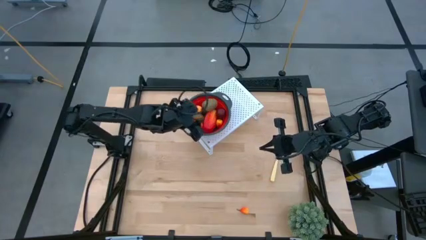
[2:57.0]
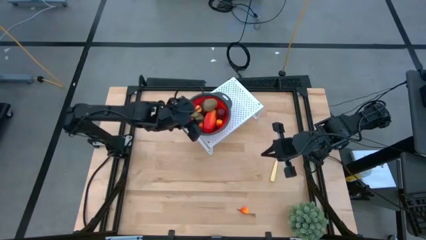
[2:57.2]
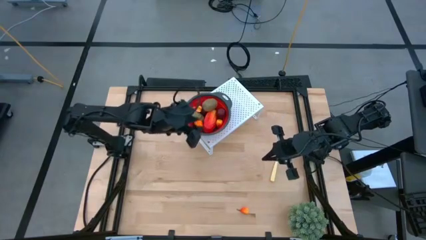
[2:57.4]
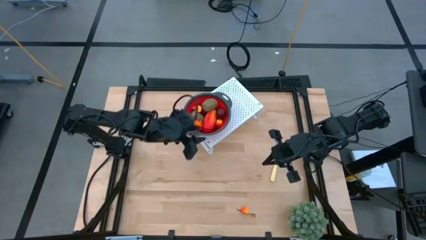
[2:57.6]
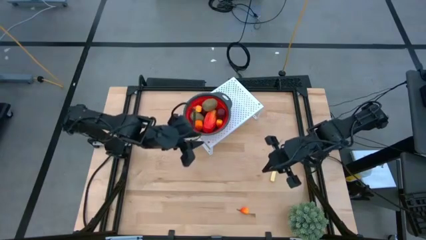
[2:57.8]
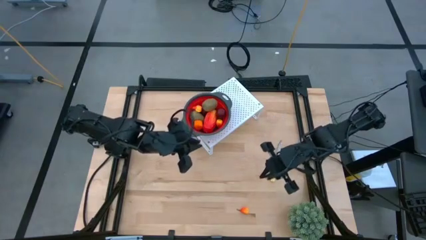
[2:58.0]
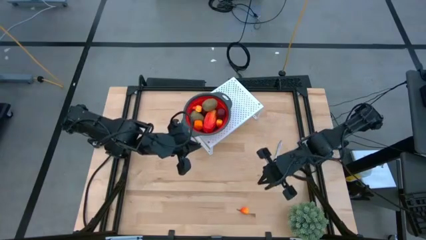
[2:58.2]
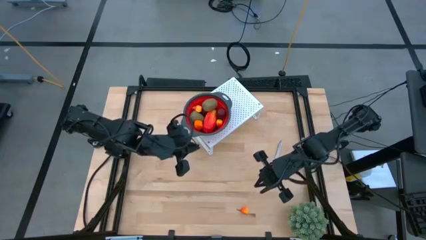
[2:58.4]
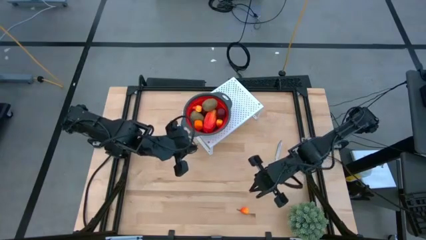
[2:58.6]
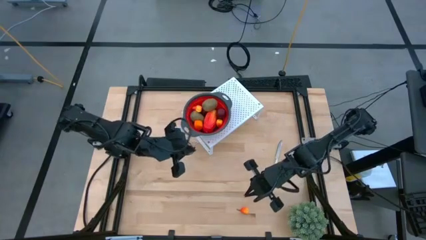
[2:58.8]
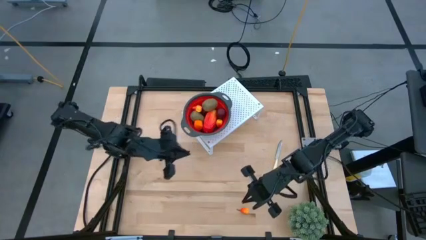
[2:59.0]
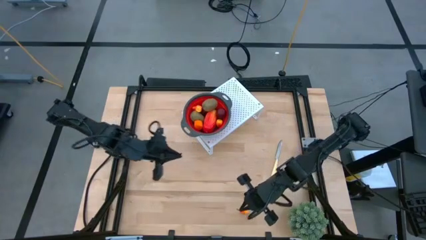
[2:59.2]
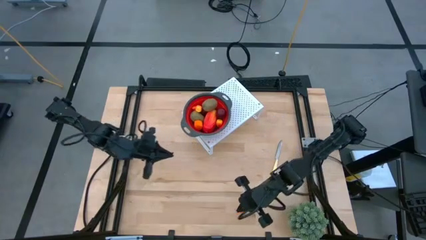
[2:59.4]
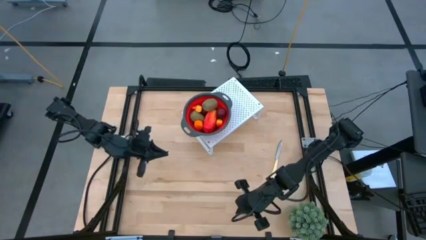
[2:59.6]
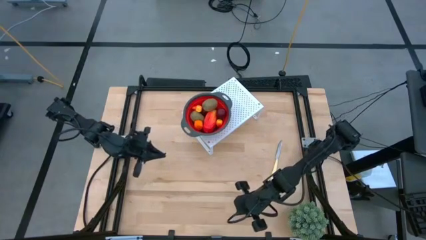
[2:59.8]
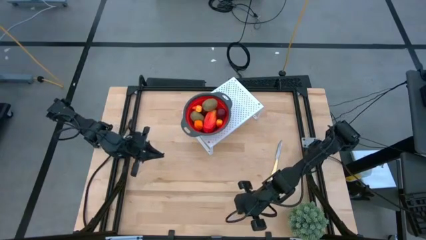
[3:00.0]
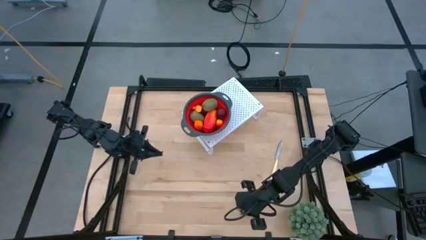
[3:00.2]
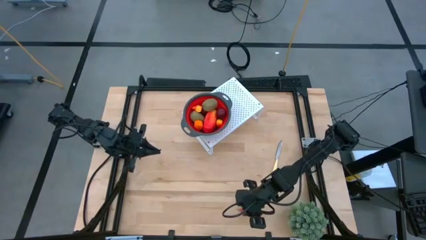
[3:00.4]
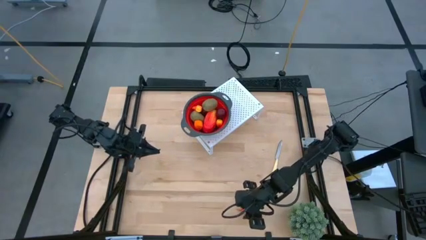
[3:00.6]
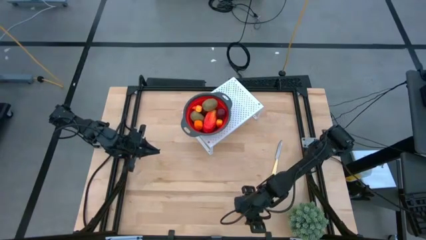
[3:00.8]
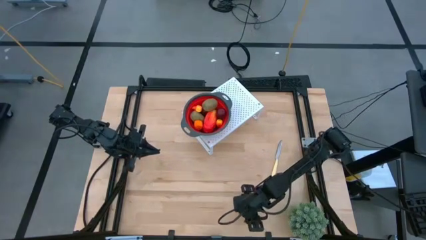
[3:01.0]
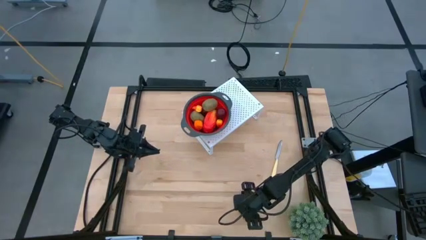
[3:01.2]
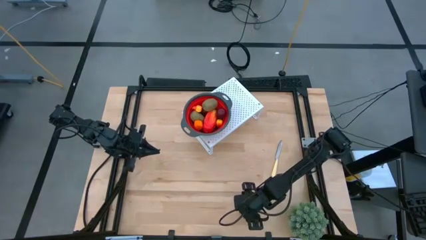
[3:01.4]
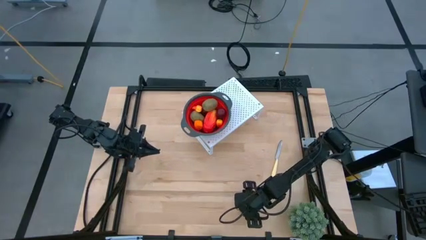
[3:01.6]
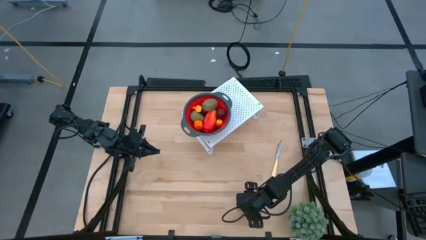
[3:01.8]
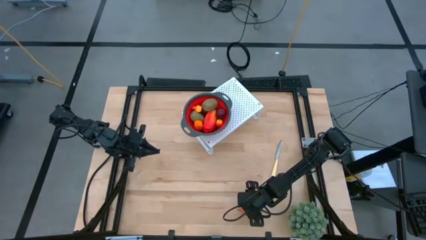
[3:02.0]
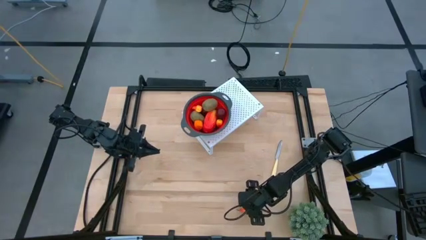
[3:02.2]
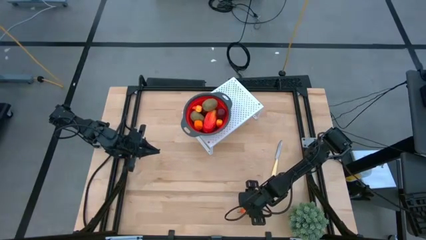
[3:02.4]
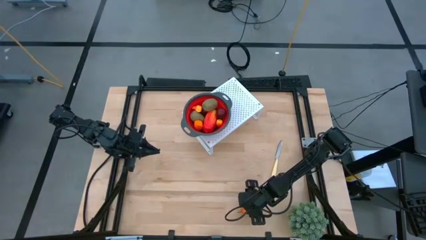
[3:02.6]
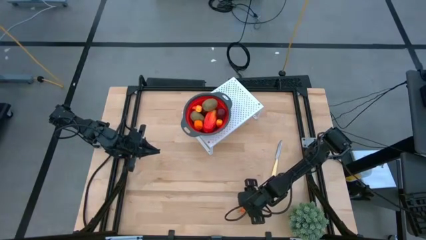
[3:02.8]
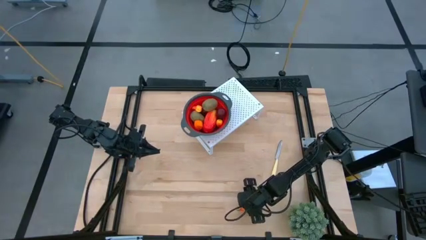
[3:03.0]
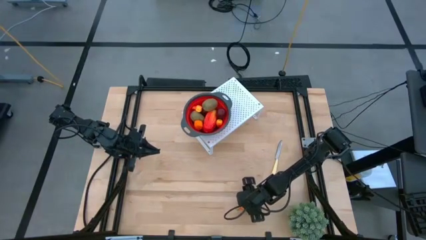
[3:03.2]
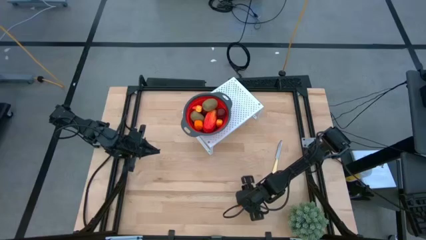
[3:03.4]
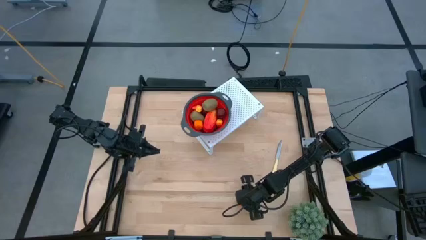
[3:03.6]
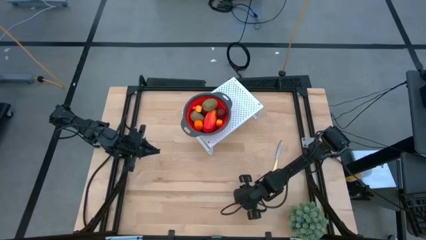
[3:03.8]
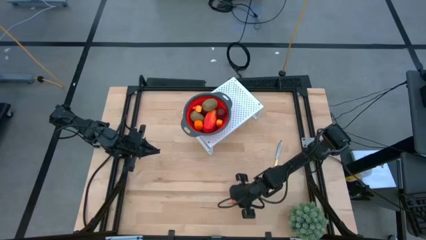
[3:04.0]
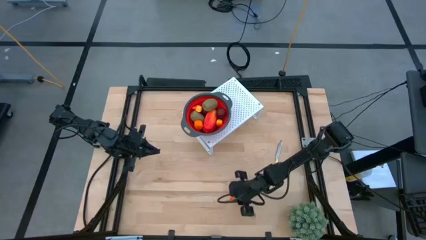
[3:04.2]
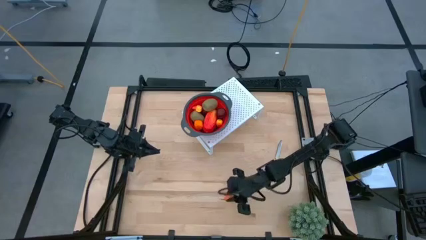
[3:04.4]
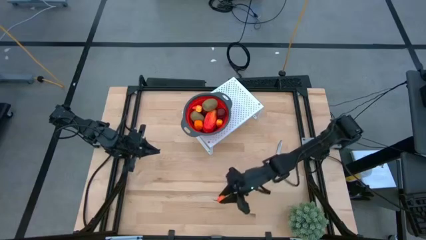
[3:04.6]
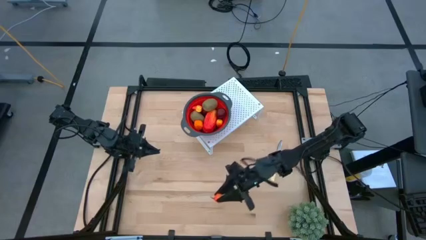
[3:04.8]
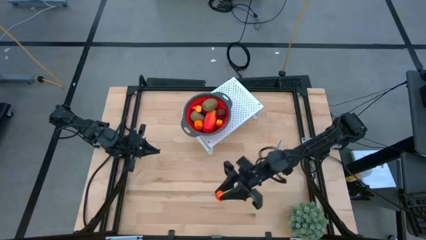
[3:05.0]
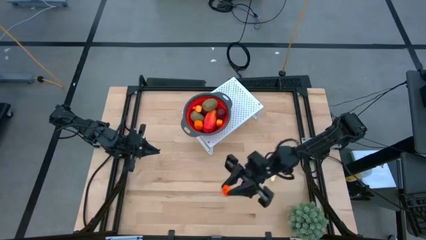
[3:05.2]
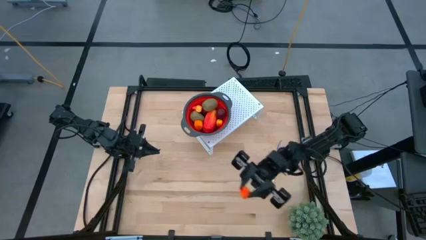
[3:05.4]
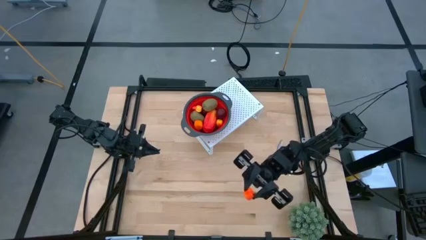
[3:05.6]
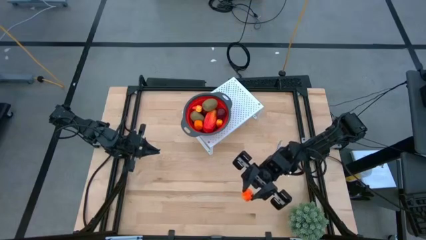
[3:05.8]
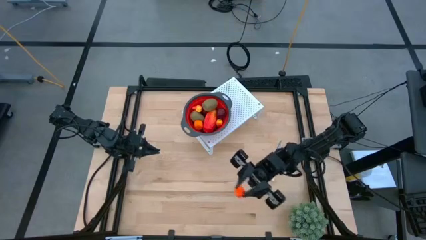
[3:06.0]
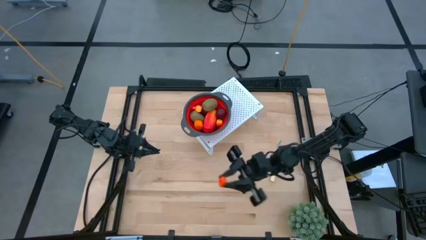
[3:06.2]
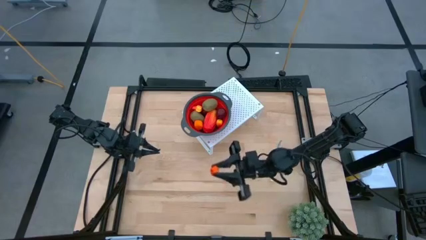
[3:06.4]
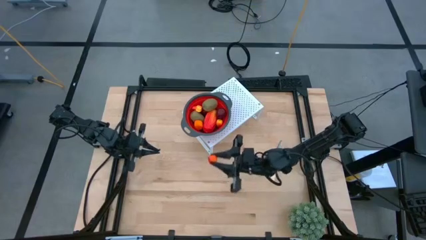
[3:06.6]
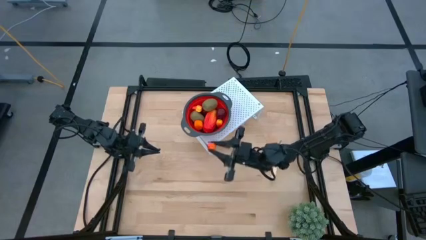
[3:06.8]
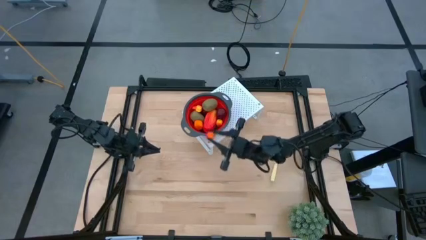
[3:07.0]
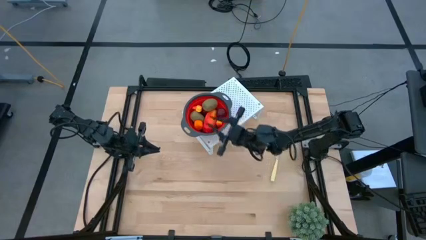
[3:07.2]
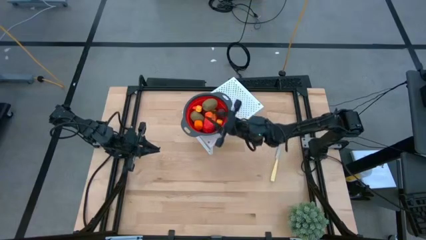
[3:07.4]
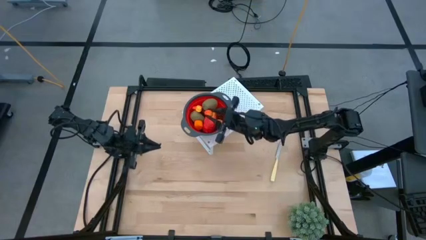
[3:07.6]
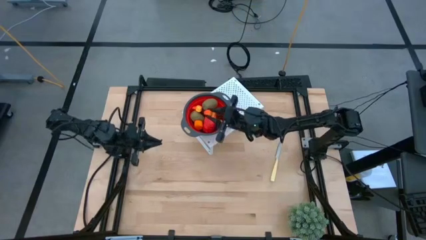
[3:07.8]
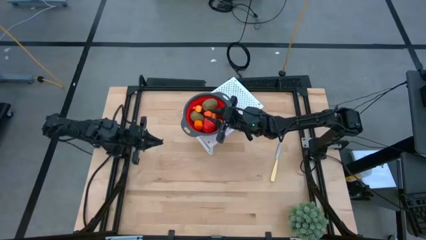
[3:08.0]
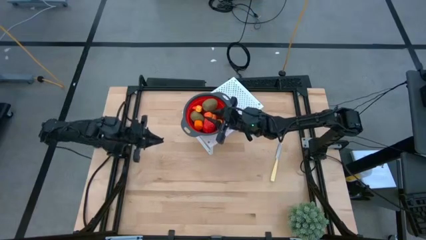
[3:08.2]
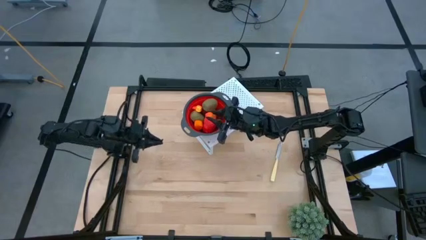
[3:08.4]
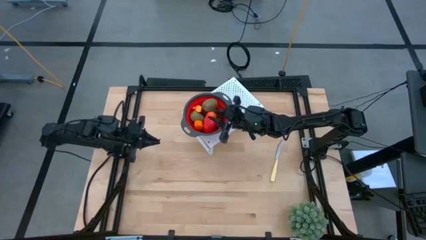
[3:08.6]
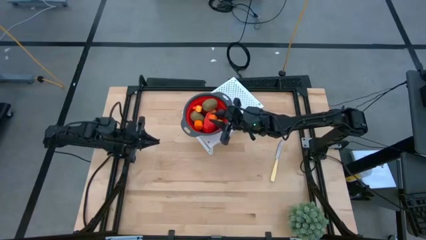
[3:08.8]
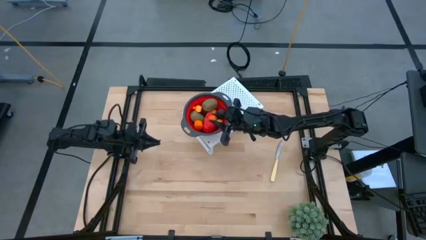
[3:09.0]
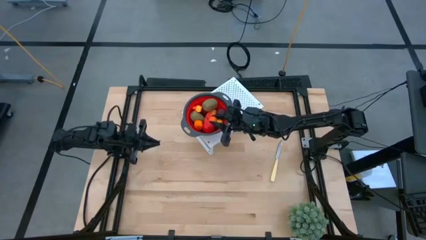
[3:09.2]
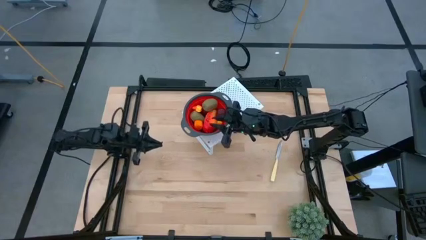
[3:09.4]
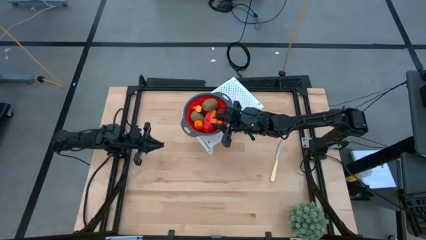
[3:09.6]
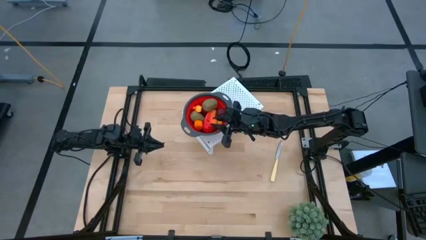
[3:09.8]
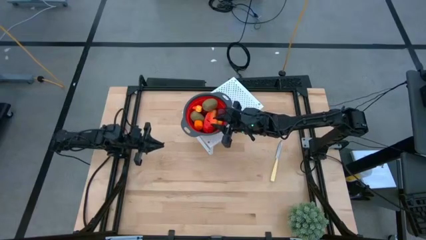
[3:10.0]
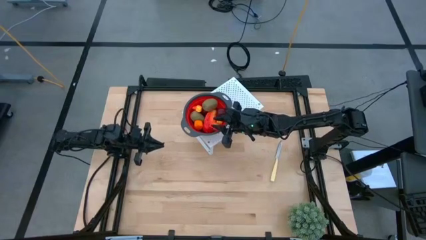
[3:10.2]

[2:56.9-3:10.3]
Task: Pick & Place Fruit
Put the peach into the red strainer bowl on the shelf

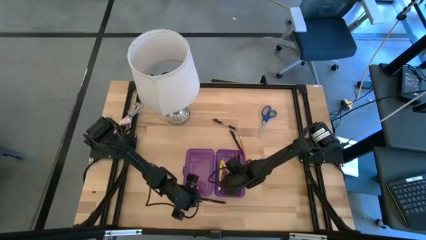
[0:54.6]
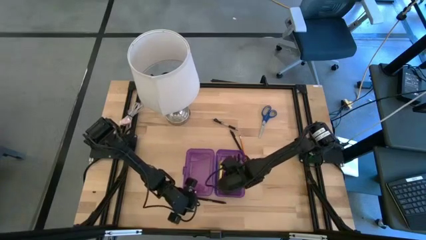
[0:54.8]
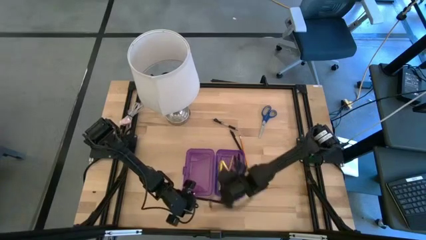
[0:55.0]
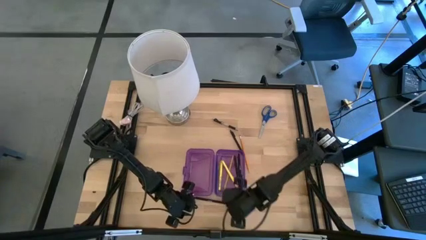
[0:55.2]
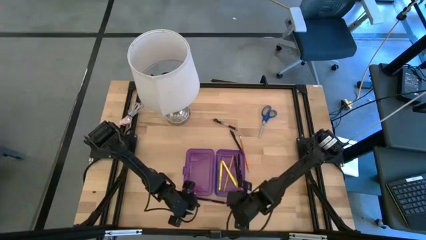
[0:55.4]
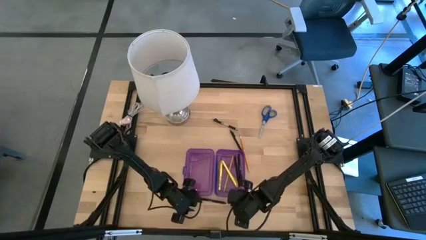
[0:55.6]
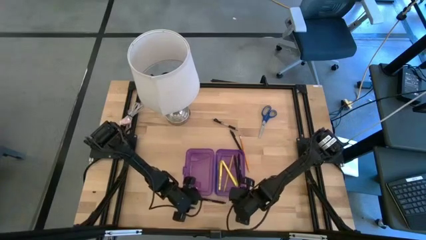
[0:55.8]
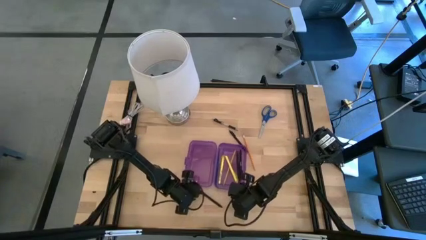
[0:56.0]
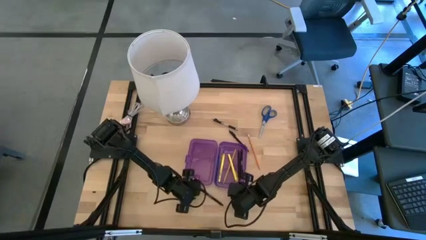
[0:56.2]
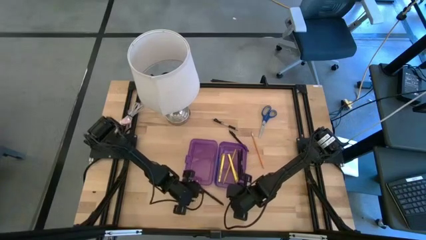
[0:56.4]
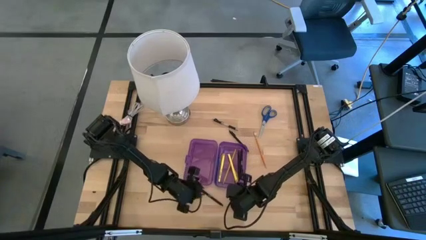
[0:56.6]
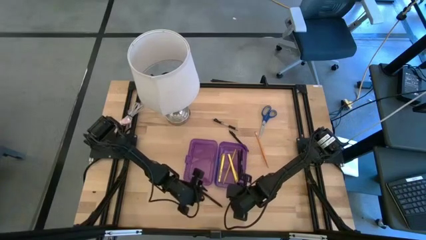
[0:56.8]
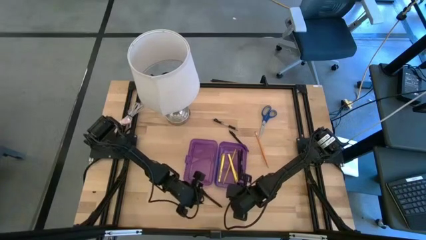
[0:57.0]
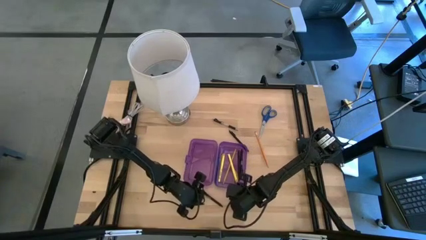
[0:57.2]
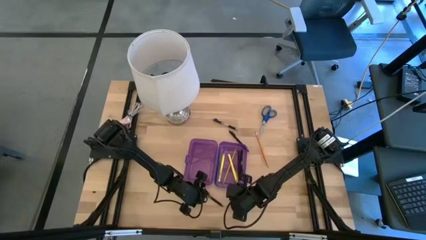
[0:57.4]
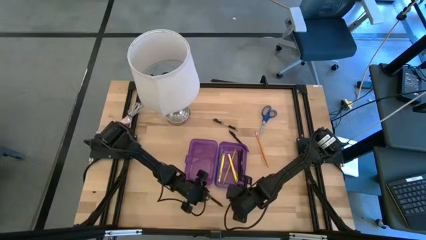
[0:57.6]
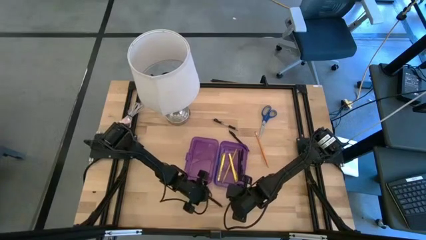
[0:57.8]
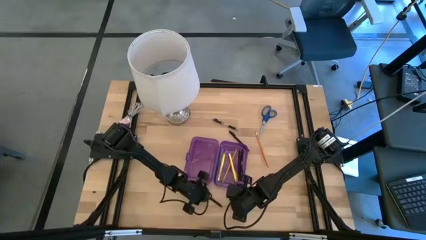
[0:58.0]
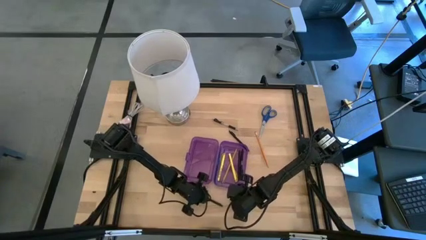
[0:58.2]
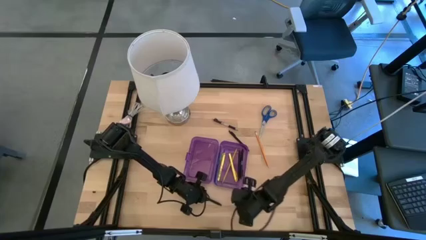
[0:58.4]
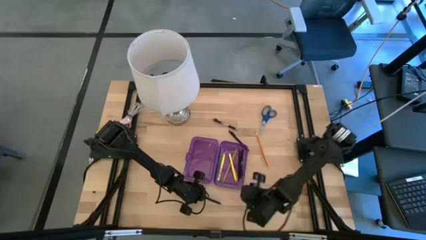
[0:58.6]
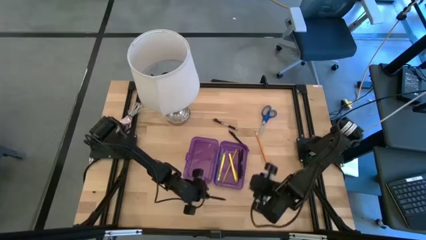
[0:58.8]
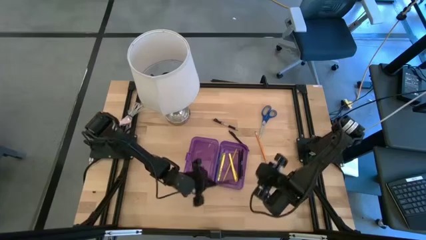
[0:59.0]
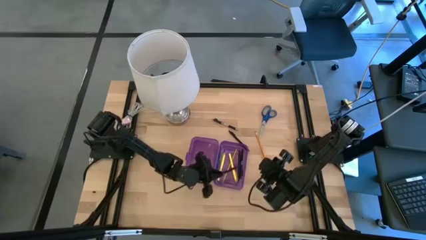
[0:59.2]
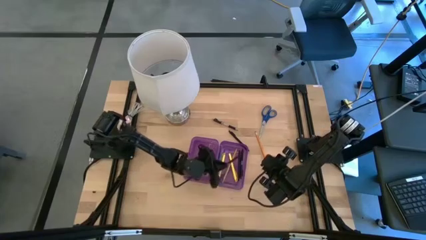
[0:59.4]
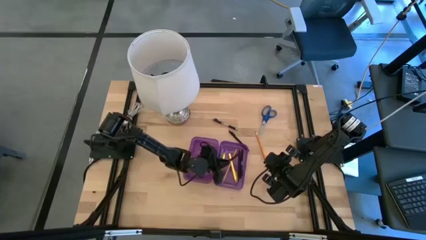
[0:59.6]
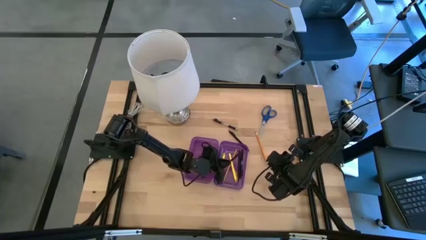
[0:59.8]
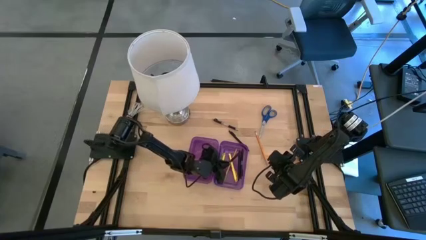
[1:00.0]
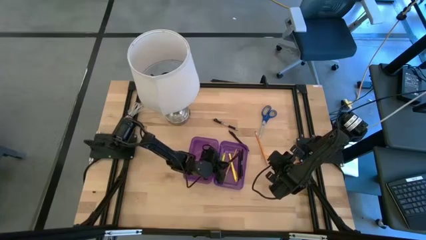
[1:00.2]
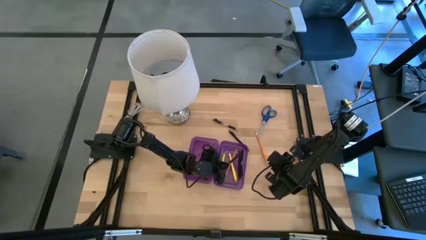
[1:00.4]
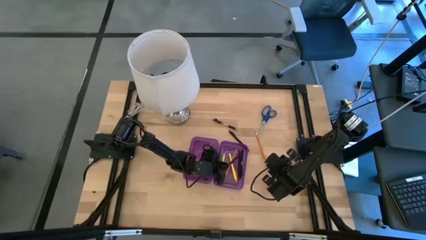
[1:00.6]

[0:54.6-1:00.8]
Task: Pick & place school supplies into a supply box
Put the black pen into the purple supply box
